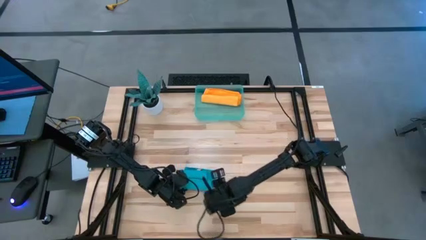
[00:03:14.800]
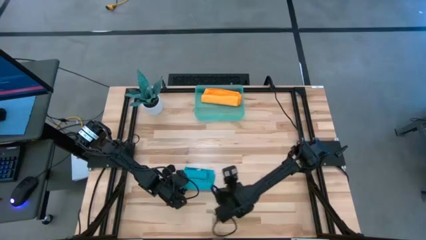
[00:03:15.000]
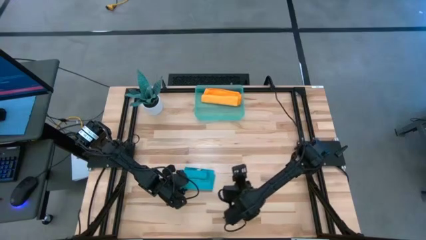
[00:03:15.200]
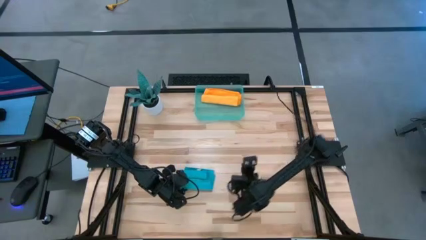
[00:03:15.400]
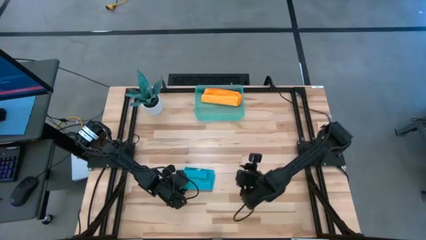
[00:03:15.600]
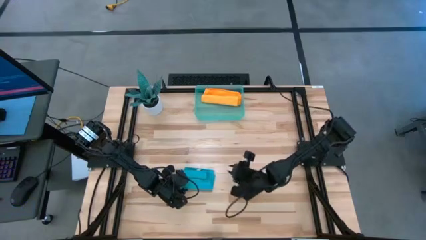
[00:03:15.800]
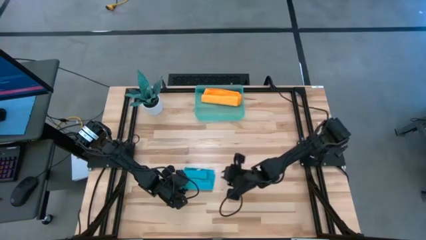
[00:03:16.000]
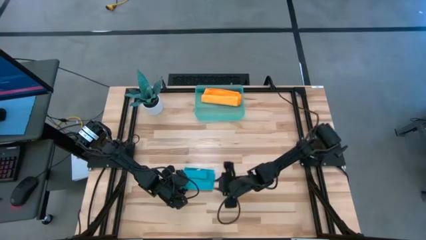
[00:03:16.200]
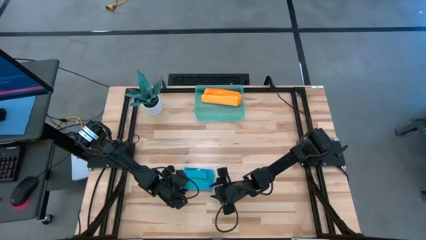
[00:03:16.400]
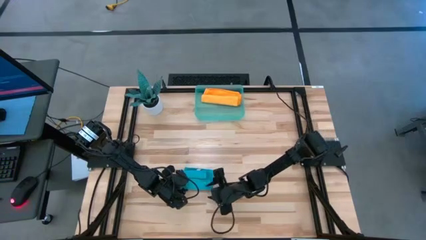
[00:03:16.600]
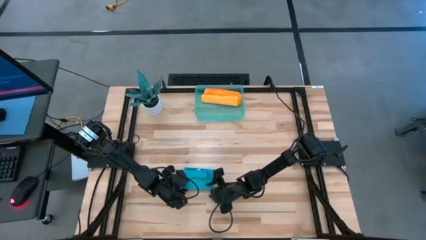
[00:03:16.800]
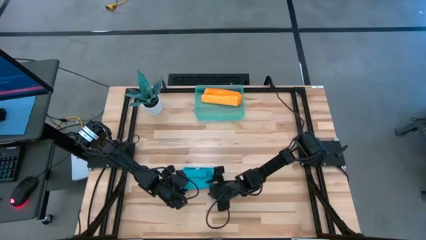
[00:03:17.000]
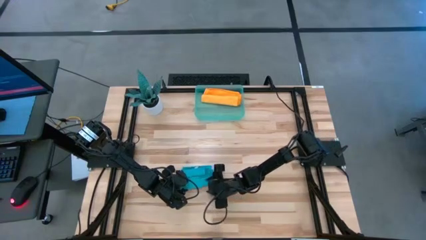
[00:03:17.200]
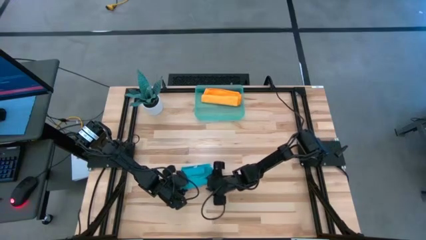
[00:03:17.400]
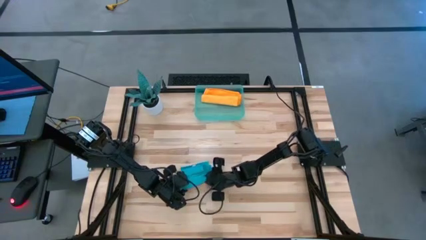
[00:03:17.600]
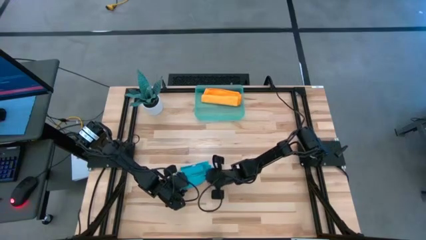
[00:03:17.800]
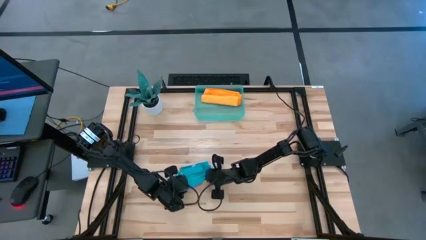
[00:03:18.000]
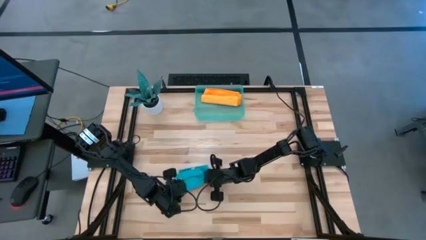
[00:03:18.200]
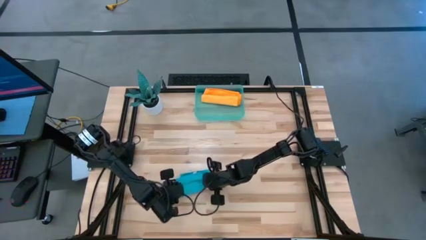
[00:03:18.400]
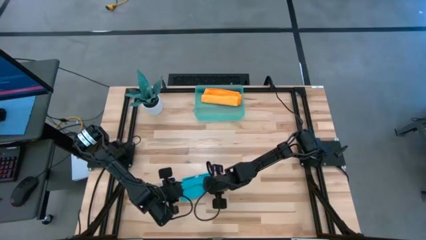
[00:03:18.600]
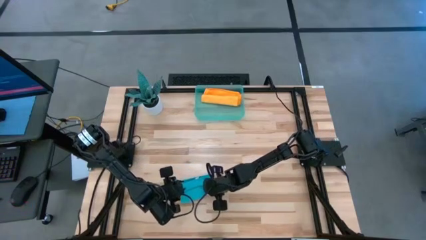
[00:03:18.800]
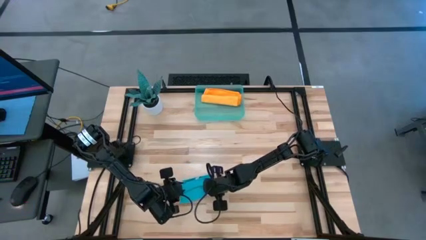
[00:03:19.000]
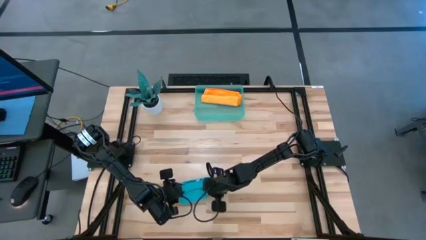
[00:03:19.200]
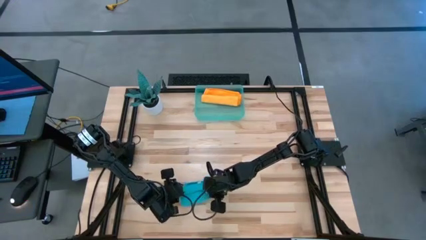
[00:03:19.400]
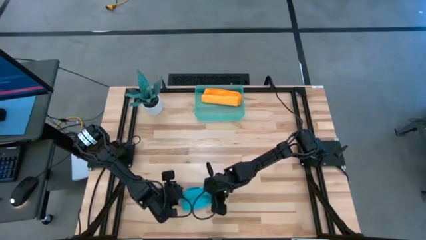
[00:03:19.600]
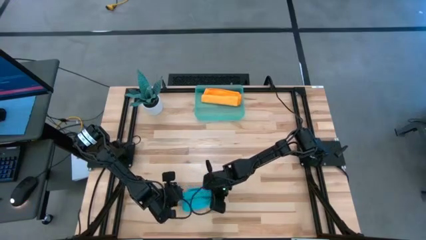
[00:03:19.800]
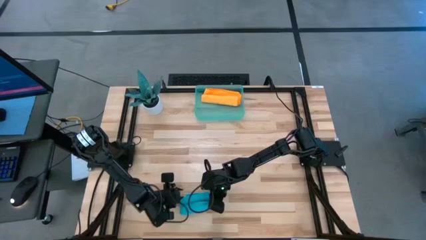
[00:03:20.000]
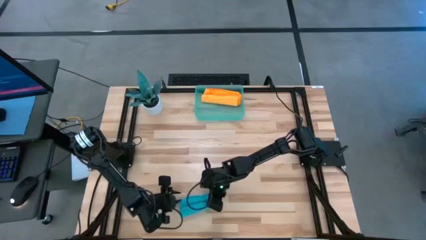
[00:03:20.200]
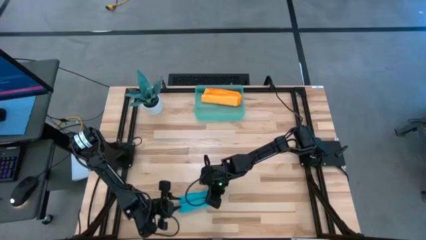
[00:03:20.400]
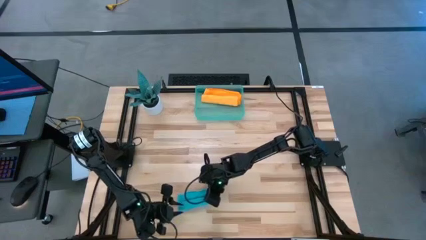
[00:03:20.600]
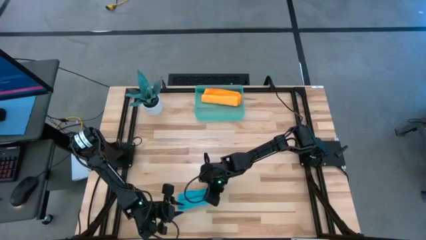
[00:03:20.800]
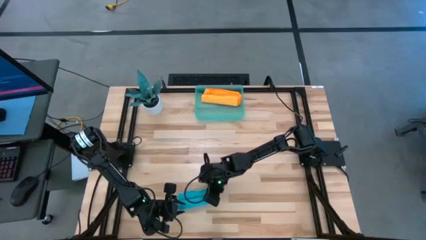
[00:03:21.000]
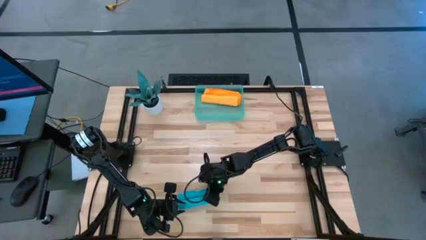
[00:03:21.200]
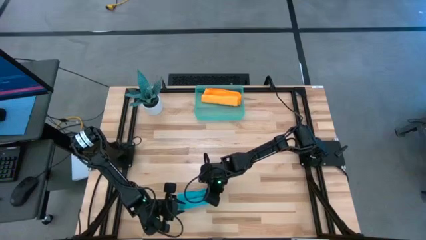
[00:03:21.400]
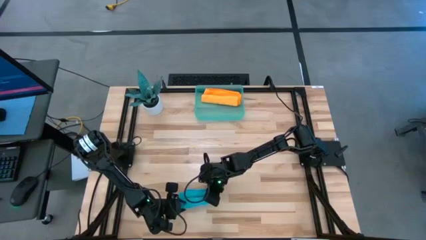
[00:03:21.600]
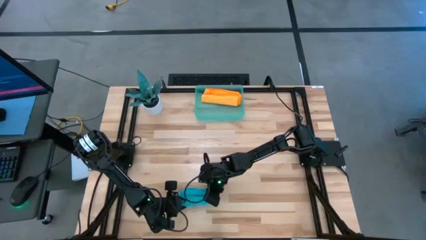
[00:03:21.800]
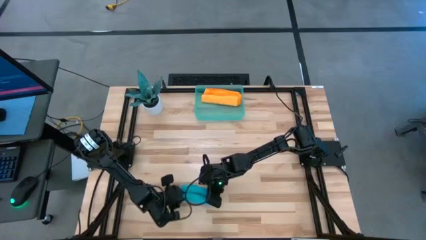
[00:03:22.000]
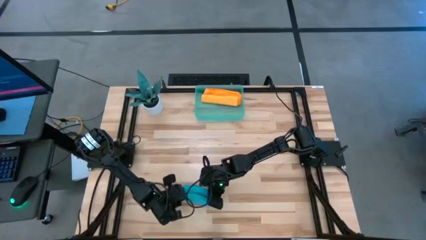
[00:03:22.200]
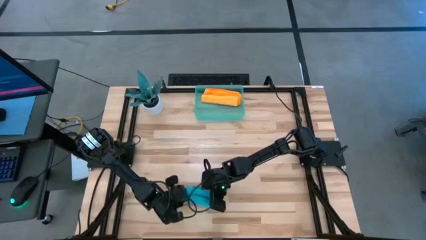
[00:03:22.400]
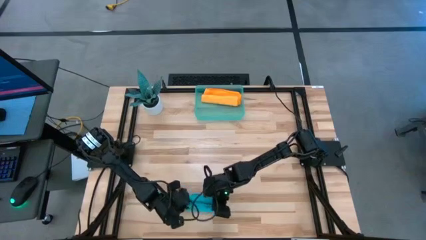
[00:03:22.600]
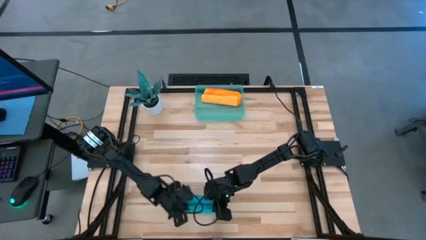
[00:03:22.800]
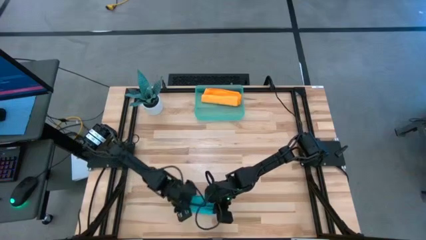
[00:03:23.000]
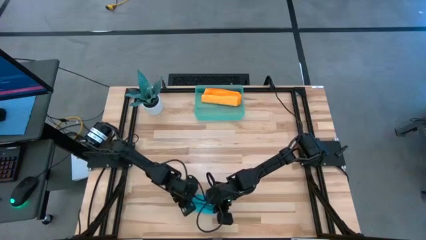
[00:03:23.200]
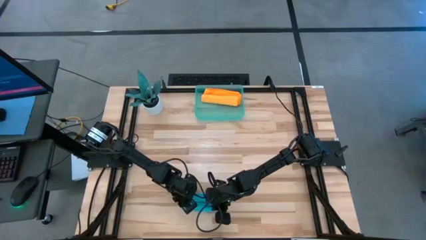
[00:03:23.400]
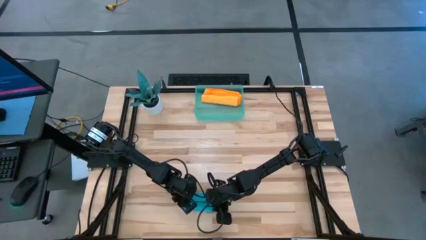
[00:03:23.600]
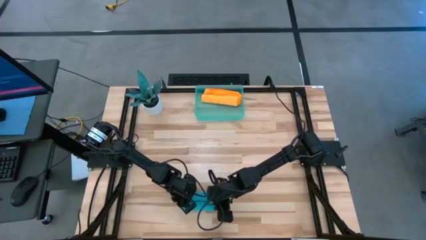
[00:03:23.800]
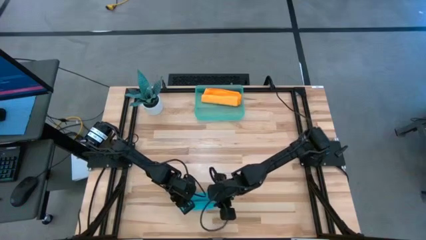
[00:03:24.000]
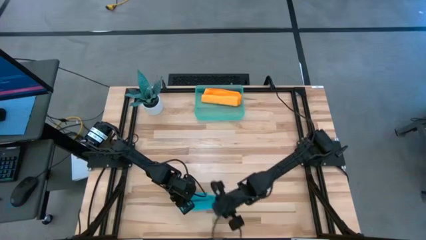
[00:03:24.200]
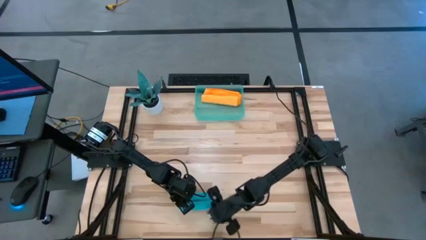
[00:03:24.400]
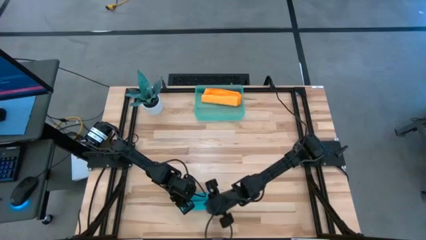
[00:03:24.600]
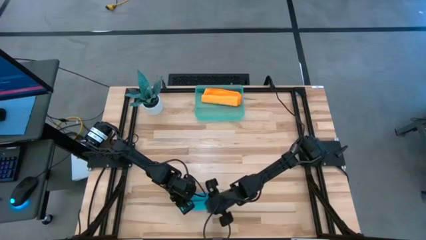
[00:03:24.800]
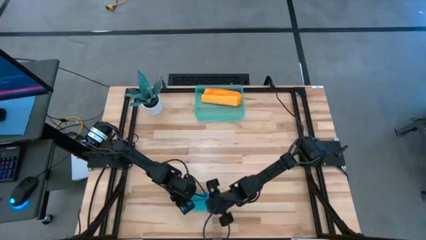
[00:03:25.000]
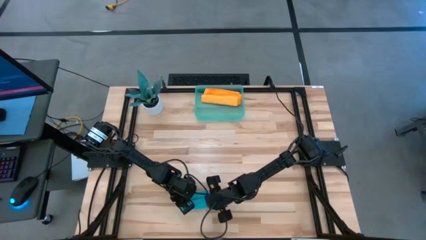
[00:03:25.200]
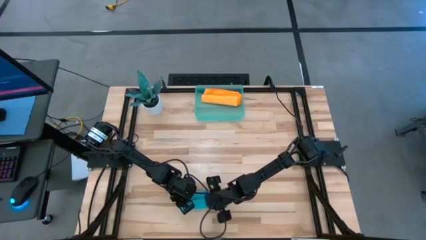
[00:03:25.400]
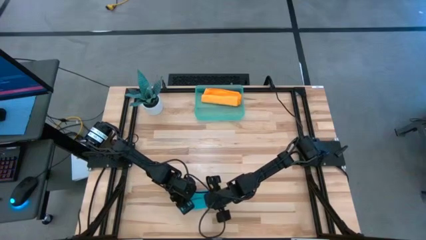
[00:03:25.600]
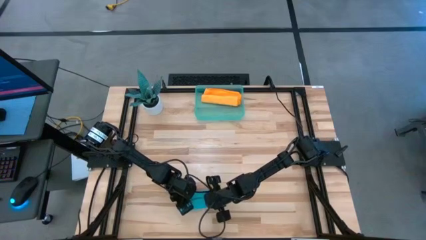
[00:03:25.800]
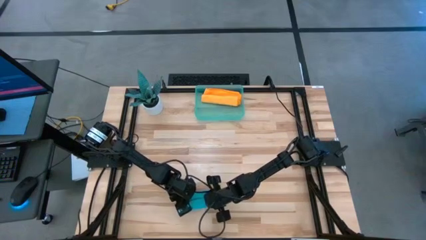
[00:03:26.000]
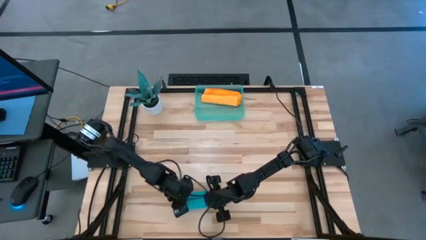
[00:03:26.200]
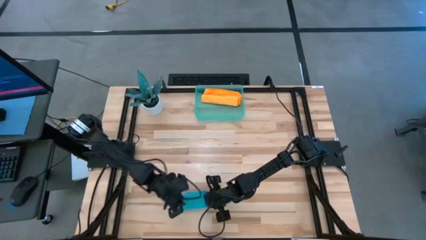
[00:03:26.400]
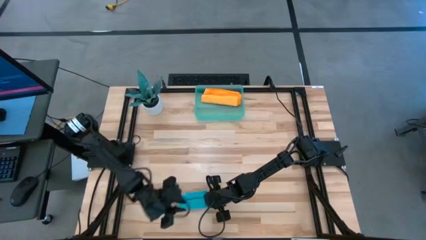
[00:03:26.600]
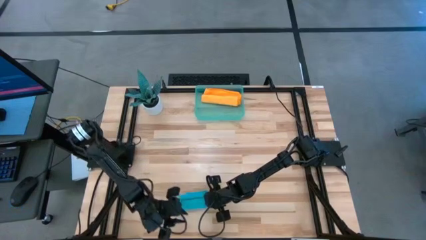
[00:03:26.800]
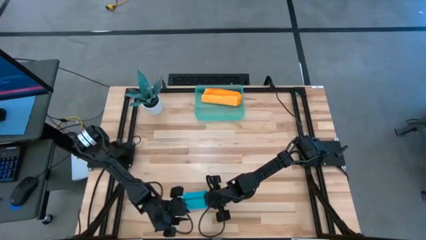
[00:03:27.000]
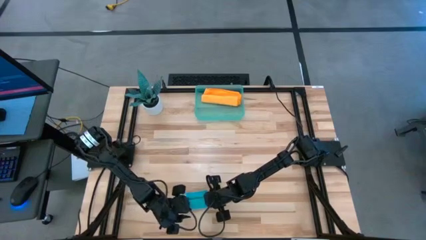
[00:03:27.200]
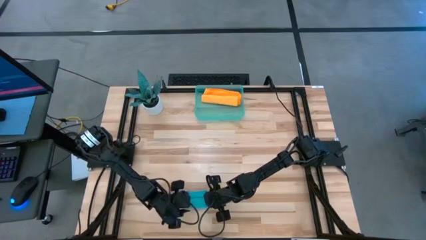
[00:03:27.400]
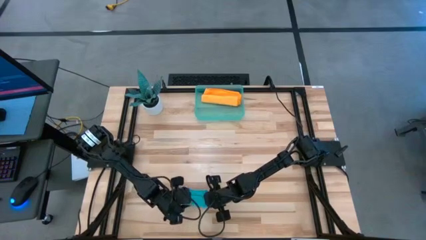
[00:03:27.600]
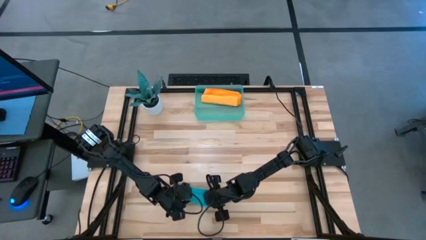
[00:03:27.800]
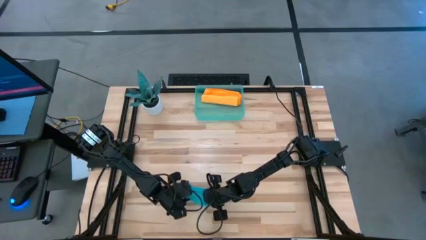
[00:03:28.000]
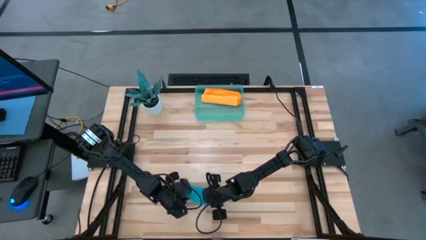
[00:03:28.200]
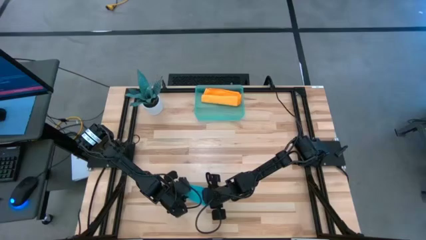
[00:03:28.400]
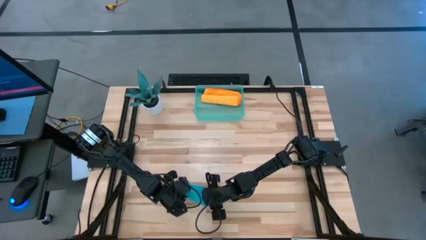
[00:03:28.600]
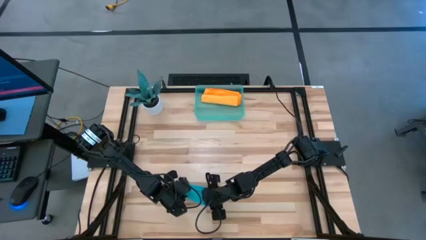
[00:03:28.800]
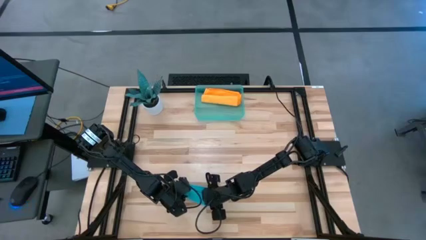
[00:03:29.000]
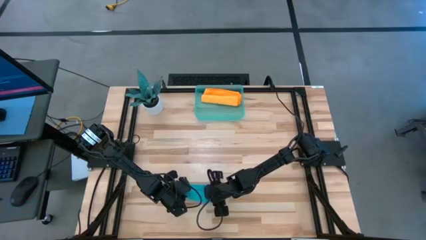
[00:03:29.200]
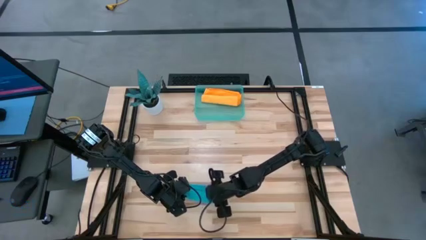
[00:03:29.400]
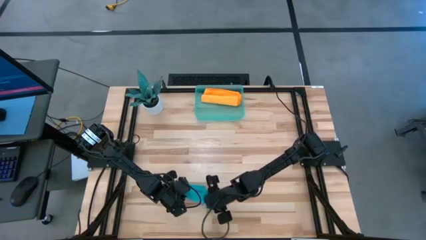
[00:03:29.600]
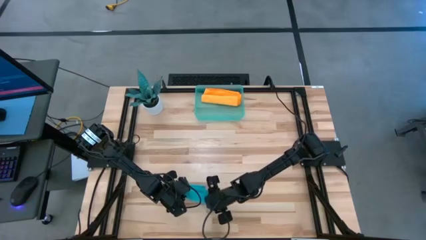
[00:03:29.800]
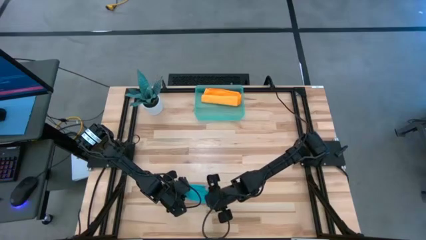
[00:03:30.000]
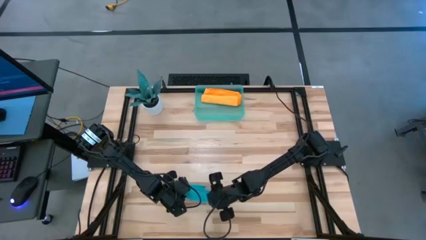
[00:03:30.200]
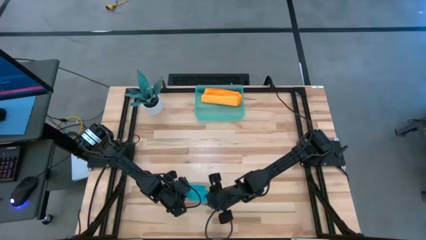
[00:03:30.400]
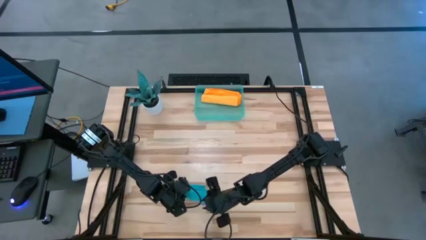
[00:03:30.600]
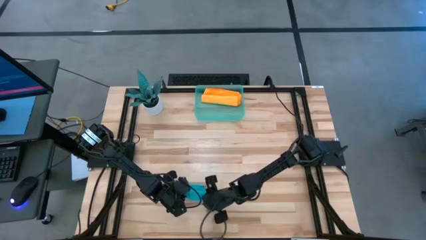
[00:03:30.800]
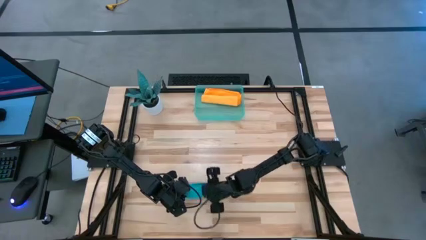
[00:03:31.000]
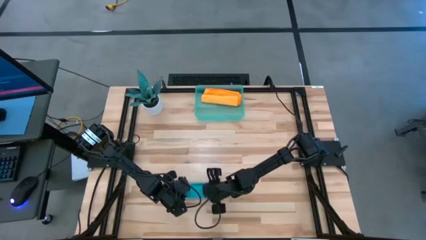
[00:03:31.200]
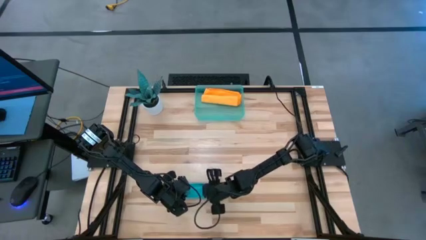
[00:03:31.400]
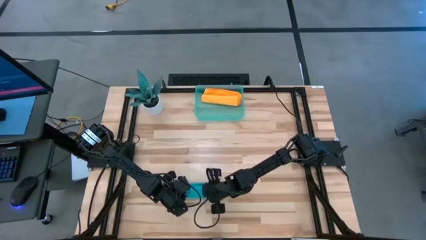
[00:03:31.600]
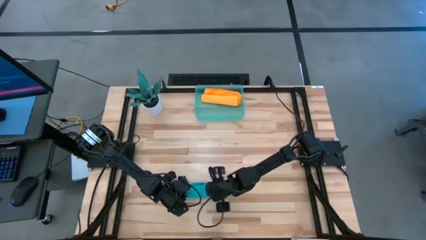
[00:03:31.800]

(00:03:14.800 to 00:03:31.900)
Task: Roll microfiber towels into tight, uniform cylinder then place into a basket
Roll the blue microfiber cloth
